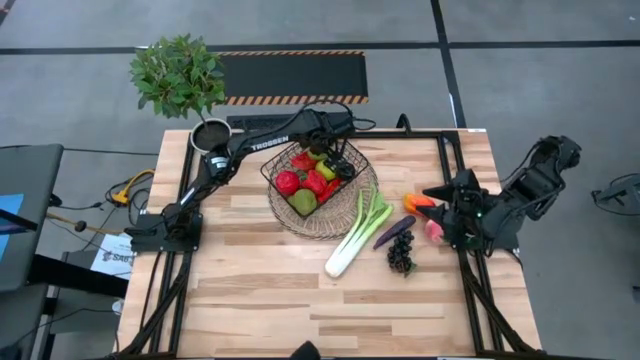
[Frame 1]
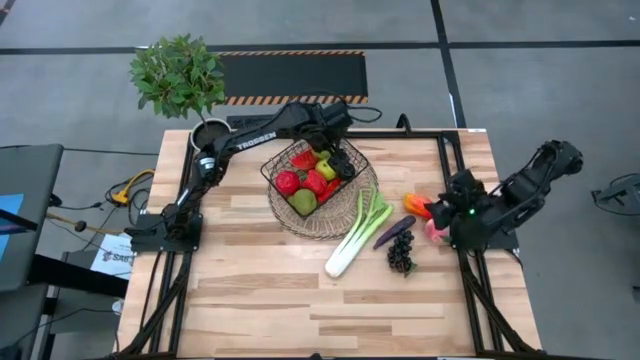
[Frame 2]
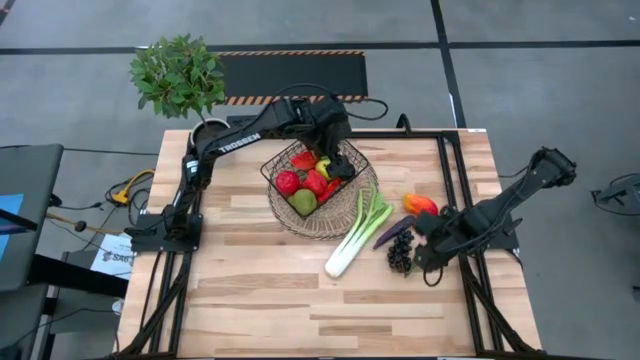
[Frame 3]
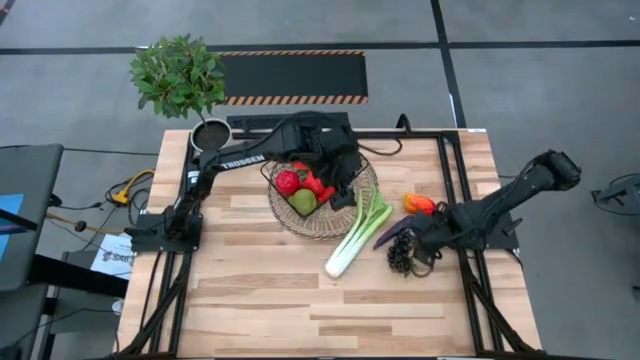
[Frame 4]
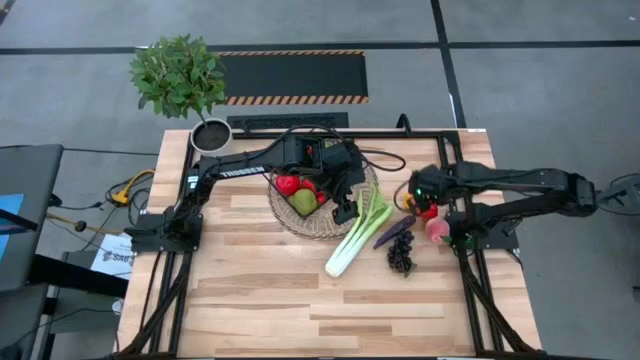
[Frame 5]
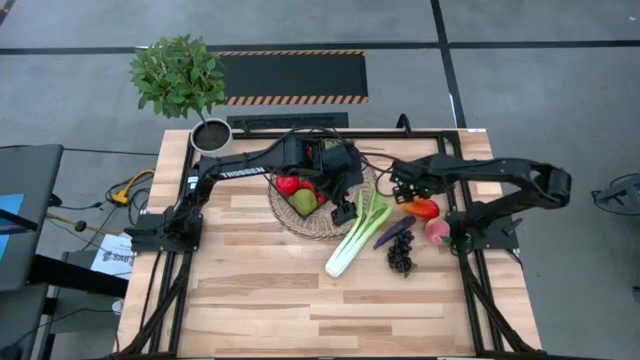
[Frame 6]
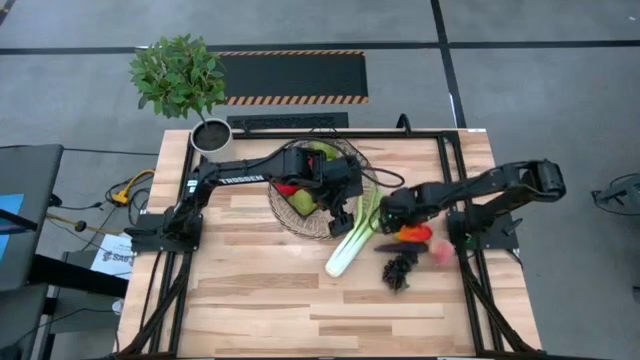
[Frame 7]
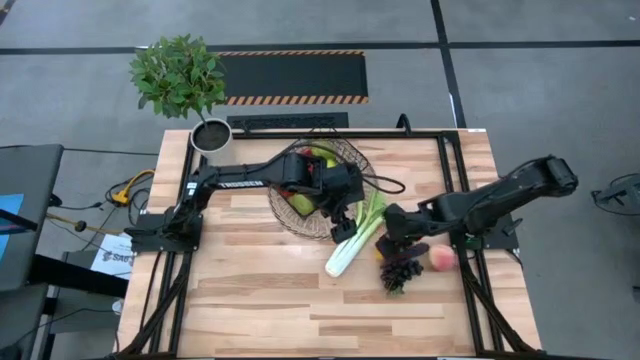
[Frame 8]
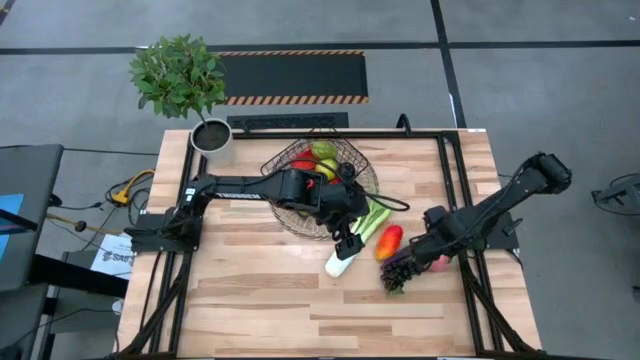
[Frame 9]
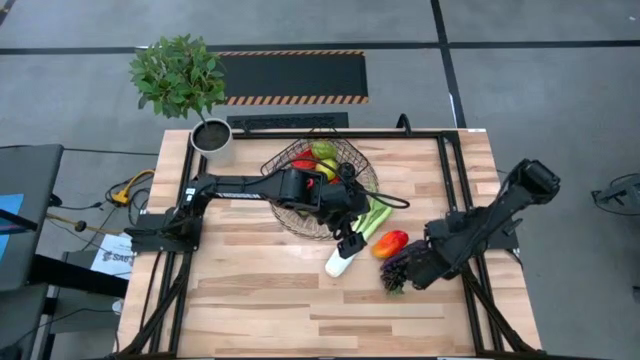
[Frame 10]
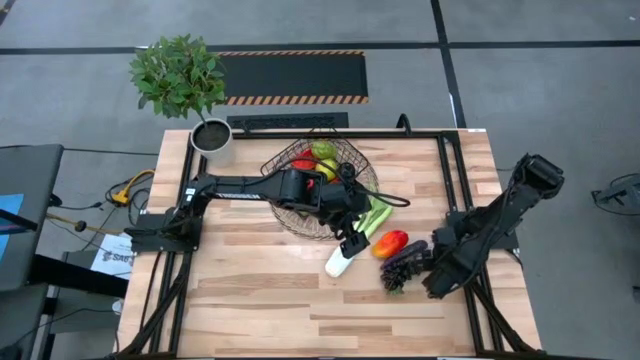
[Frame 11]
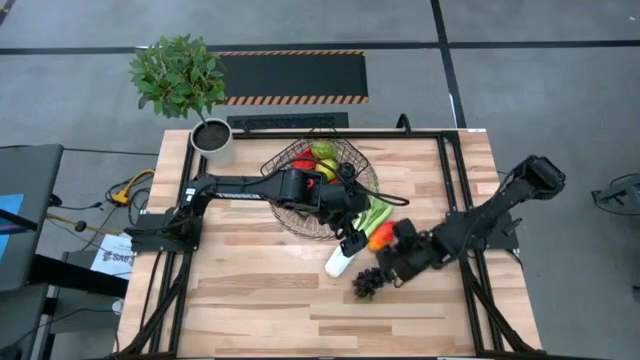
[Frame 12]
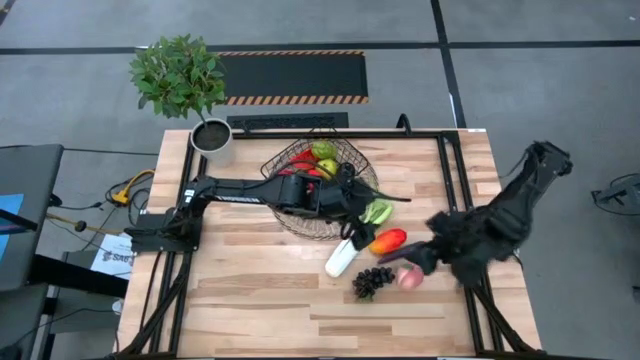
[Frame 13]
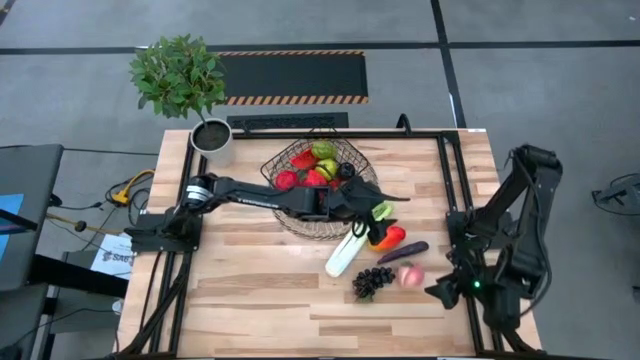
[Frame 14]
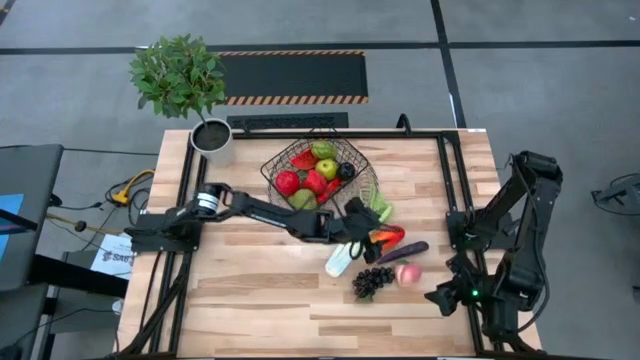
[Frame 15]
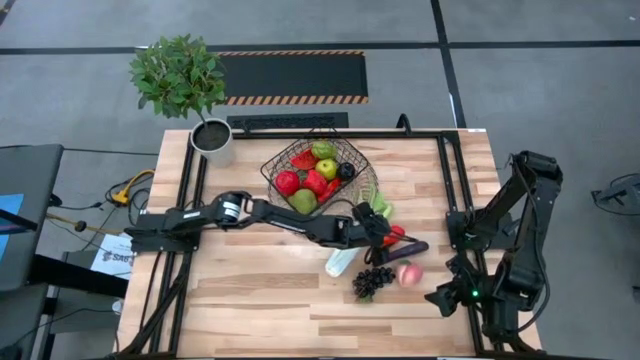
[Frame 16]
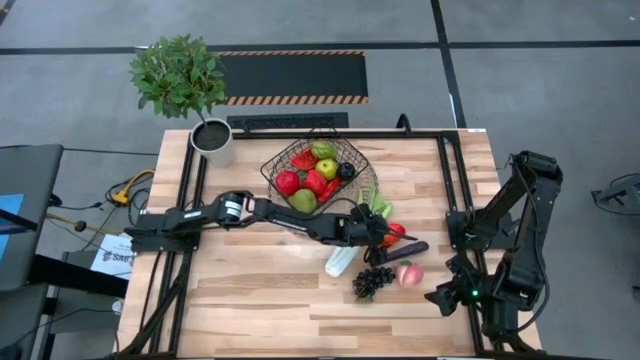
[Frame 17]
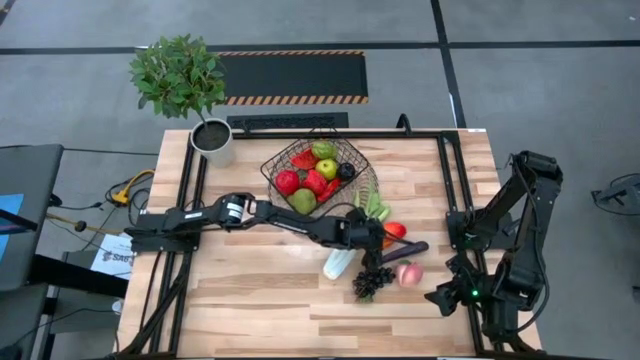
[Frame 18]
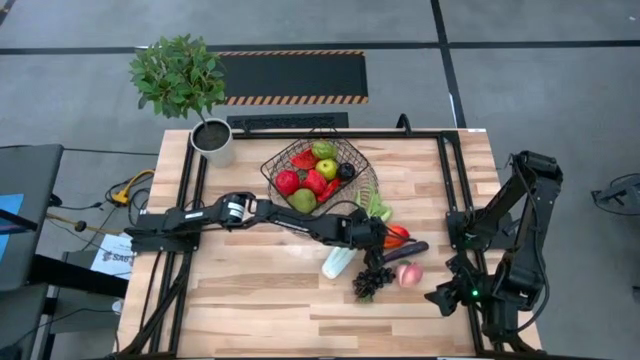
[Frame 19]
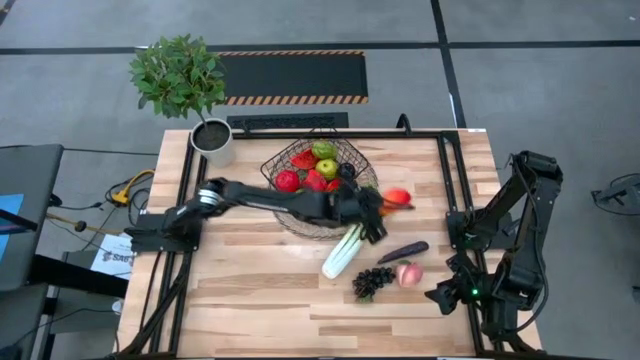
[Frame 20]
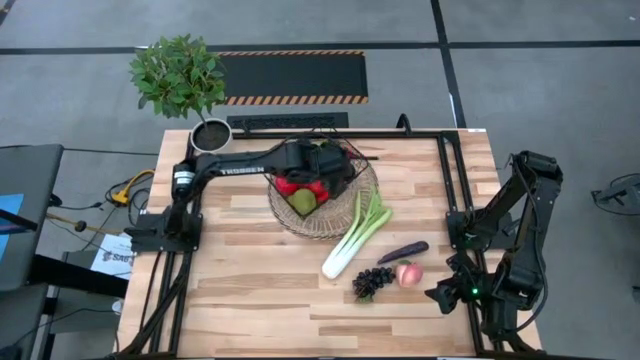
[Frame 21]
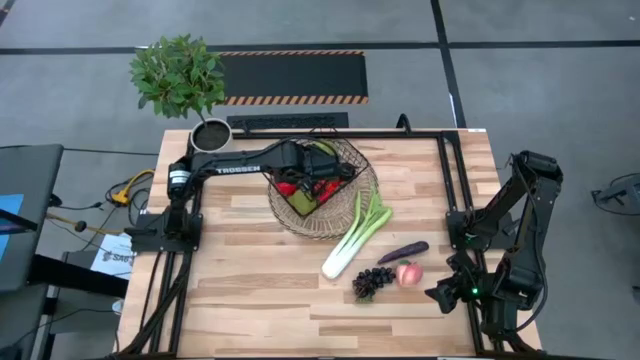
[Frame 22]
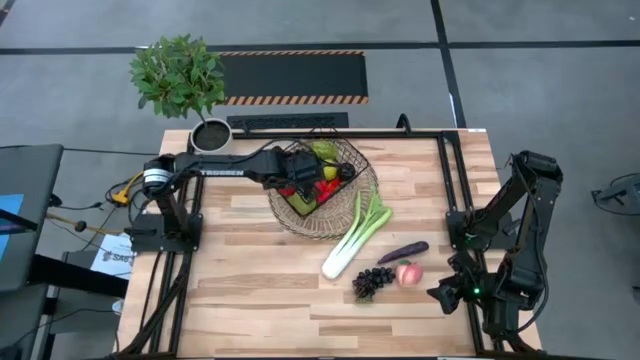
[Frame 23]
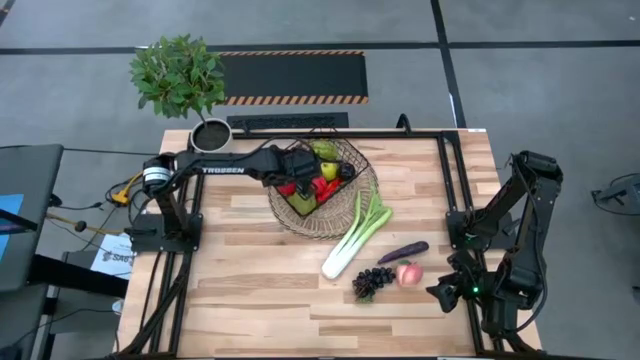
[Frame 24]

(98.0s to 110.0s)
Task: Build produce basket
Put the red mango into the wire basket

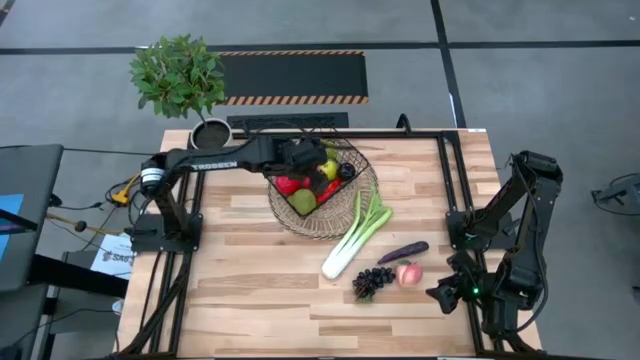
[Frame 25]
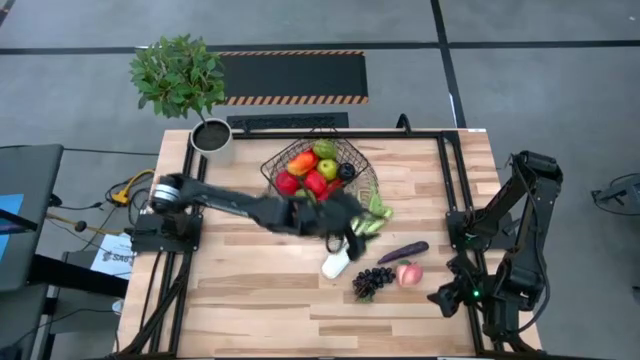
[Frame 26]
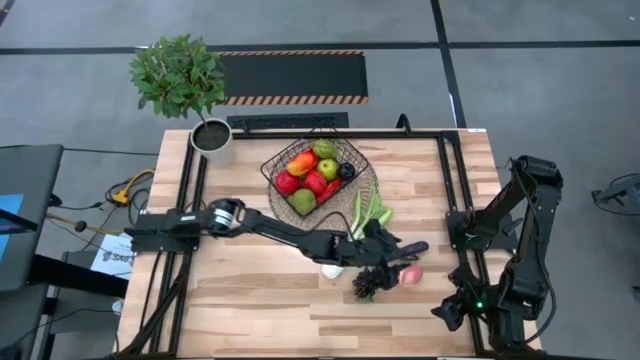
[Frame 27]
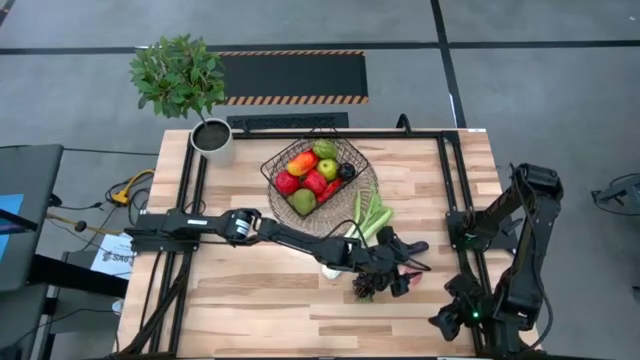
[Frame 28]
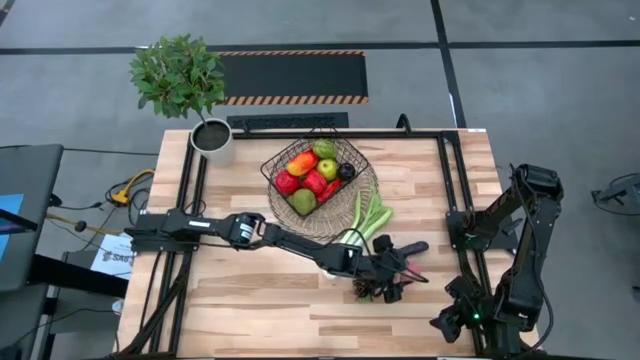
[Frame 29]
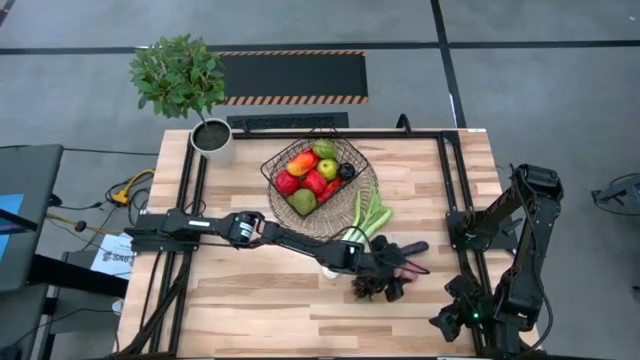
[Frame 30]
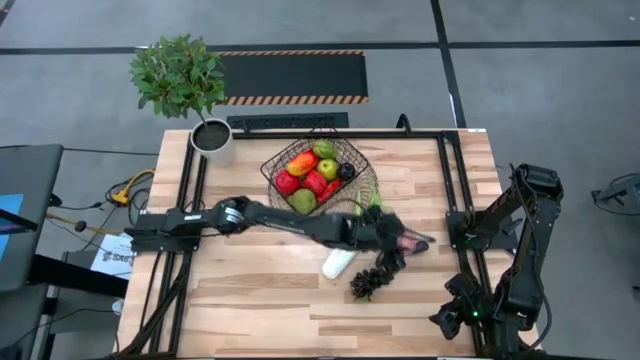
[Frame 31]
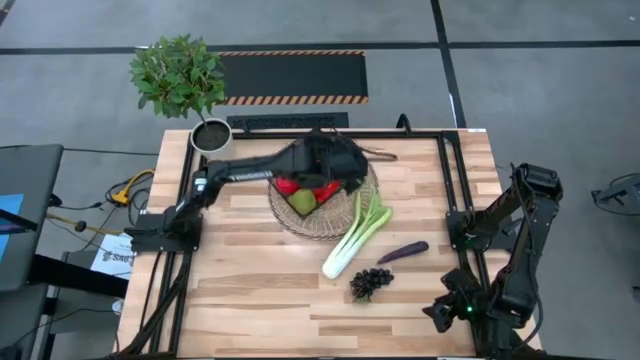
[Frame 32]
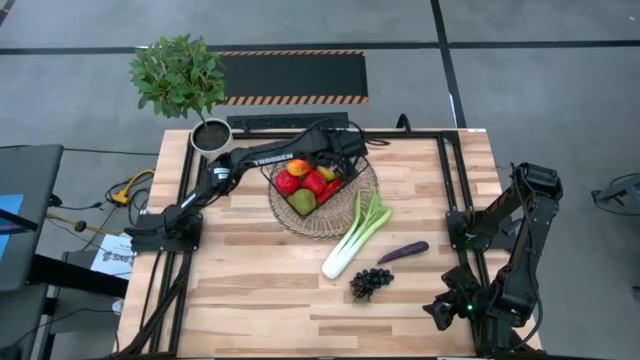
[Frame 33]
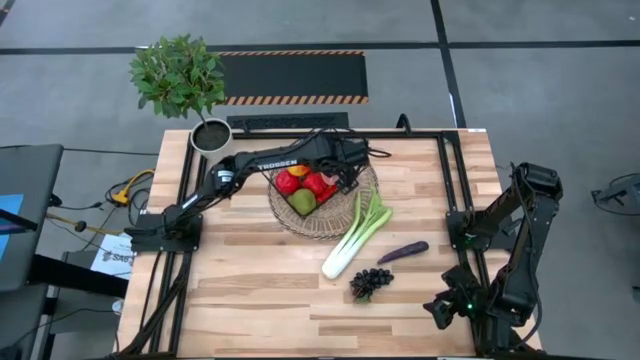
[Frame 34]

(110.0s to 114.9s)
Put the pink peach into the wire basket

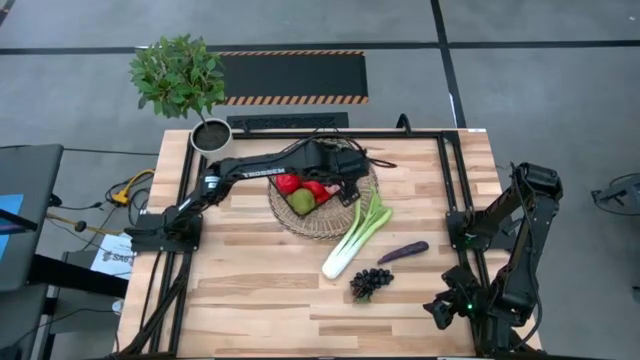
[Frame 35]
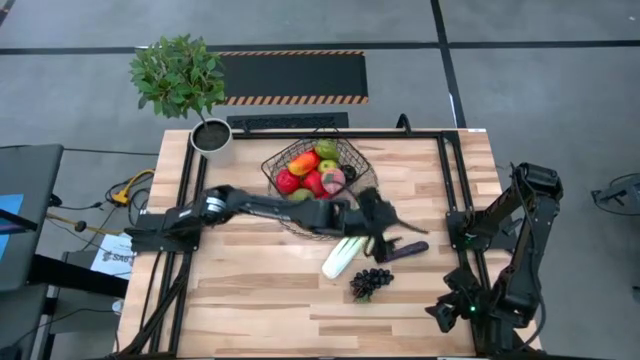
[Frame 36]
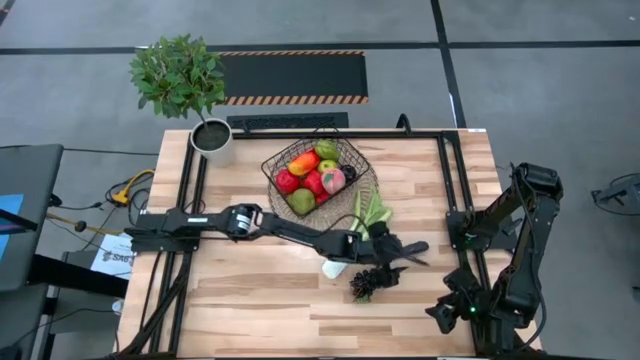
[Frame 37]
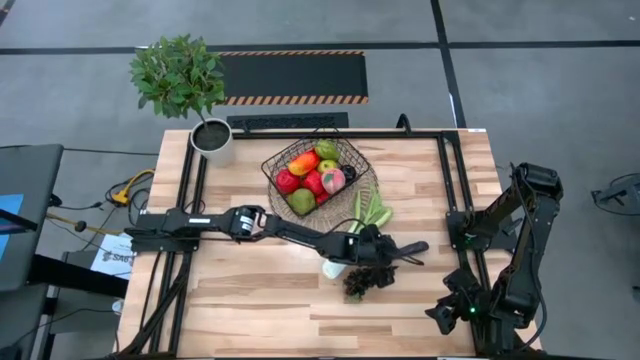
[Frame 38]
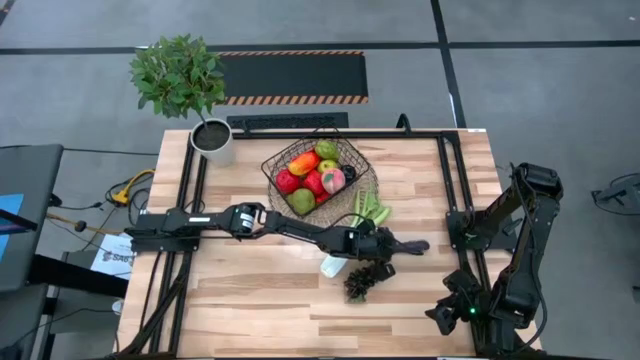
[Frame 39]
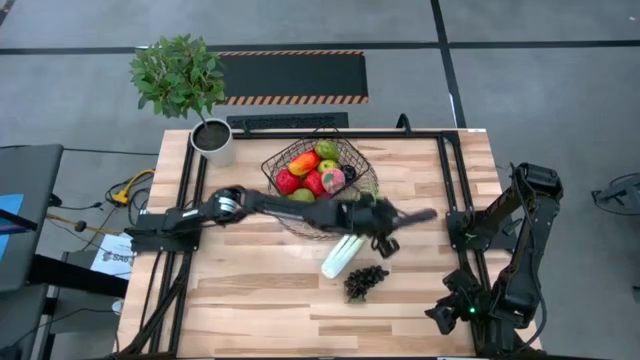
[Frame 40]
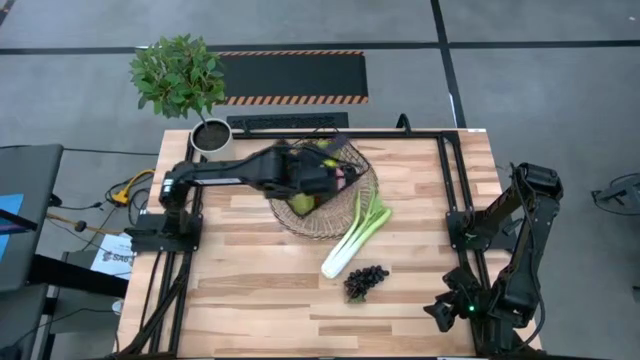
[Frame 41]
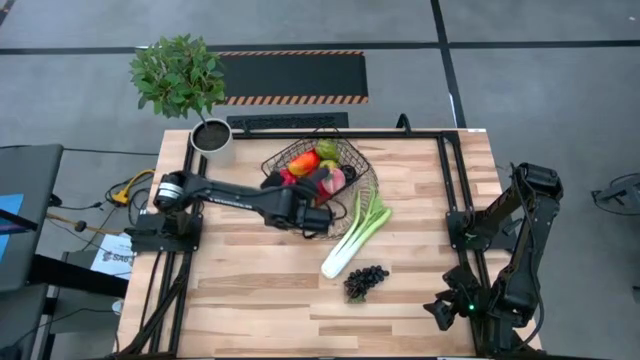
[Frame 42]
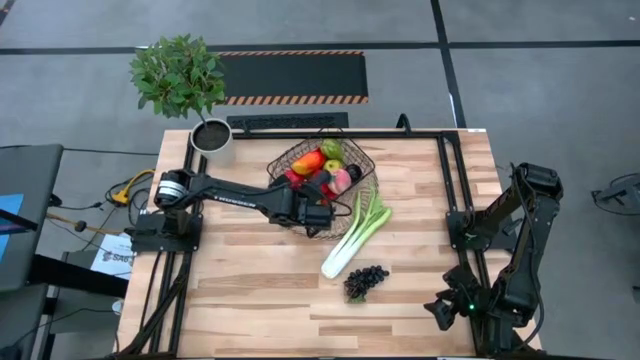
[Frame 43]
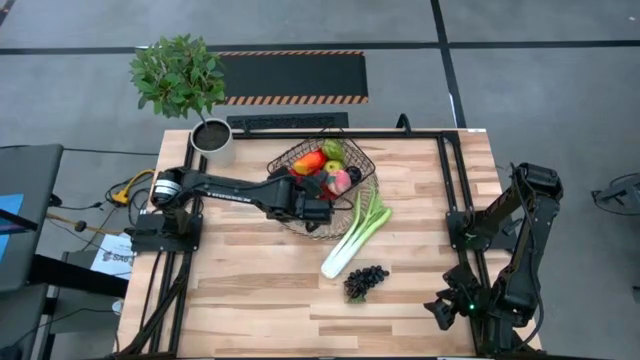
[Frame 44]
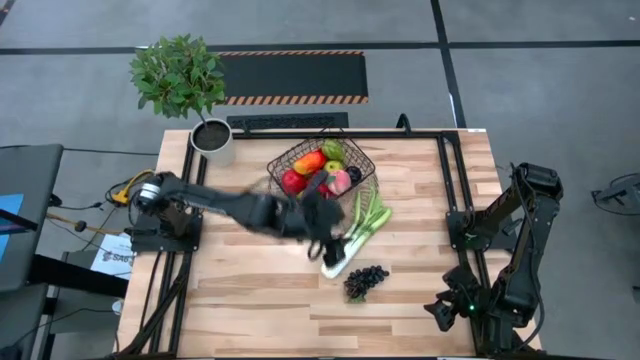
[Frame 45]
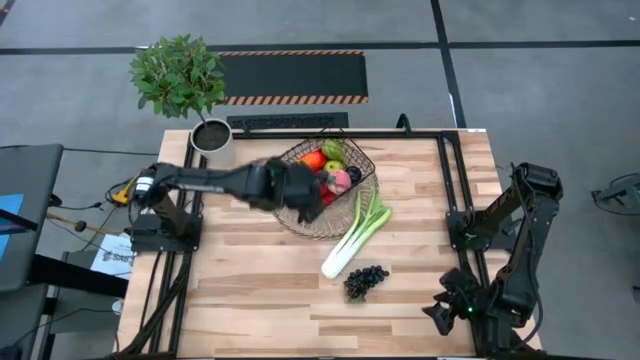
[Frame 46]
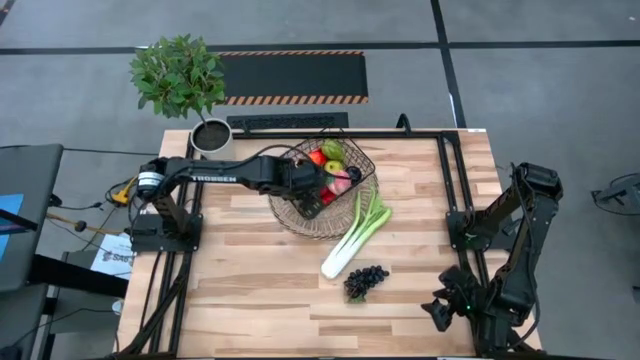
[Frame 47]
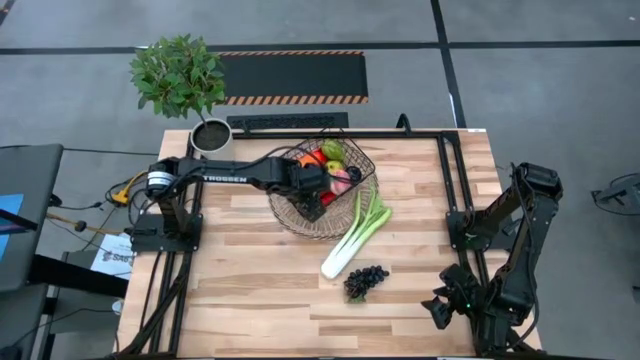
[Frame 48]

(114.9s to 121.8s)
Put the violet eggplant into the wire basket
